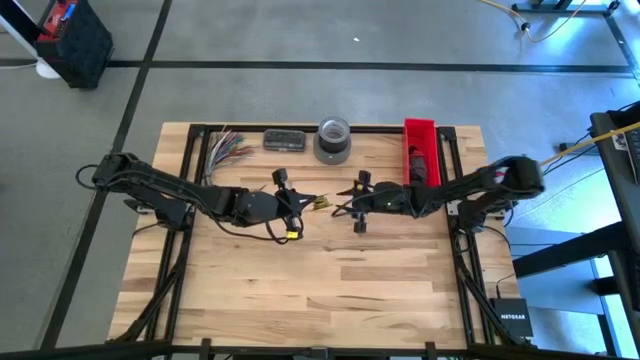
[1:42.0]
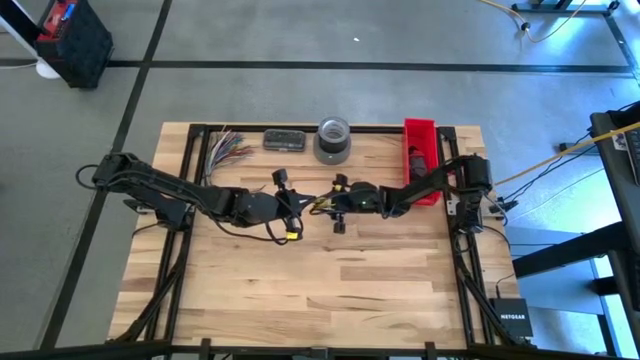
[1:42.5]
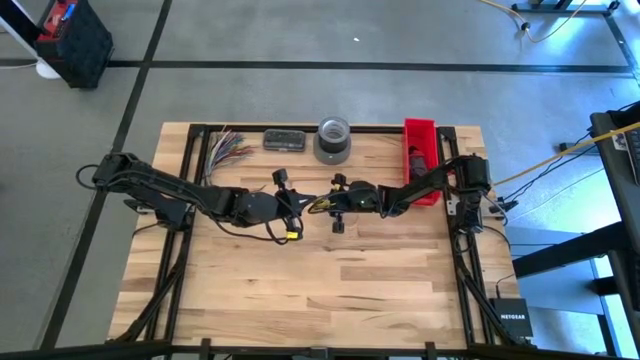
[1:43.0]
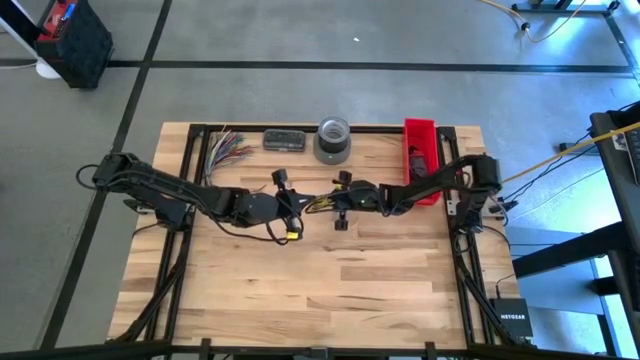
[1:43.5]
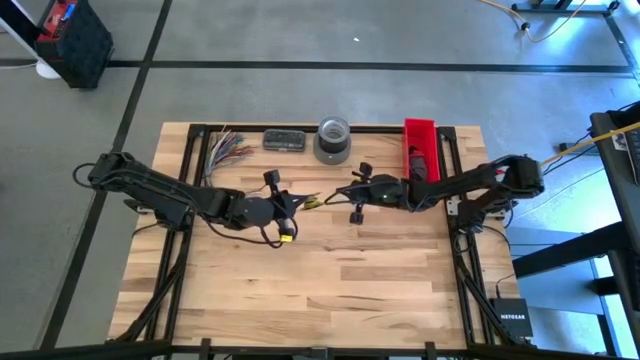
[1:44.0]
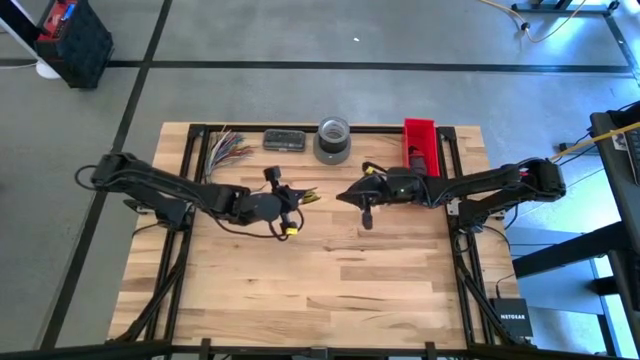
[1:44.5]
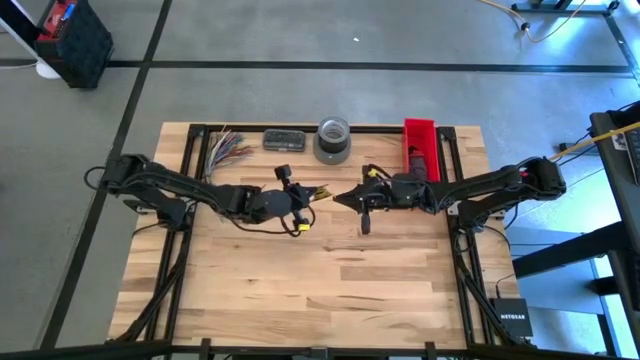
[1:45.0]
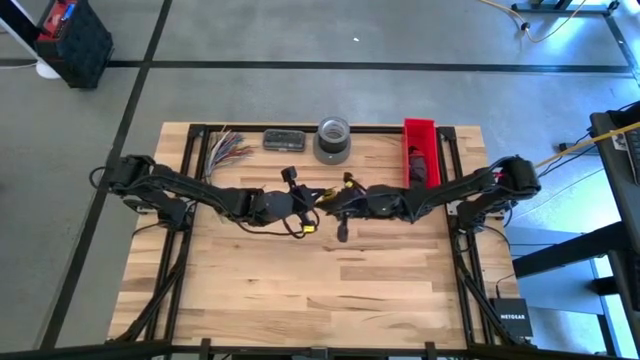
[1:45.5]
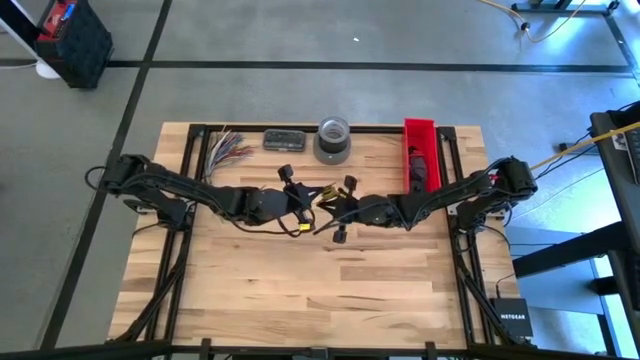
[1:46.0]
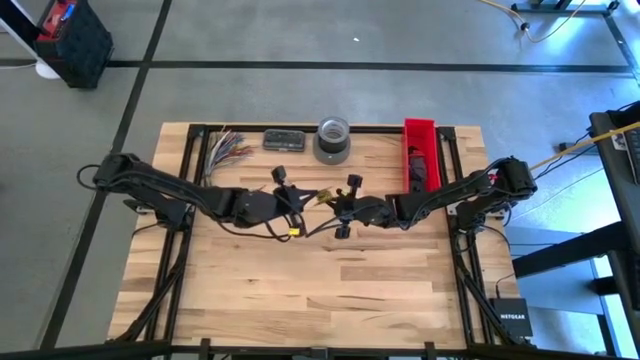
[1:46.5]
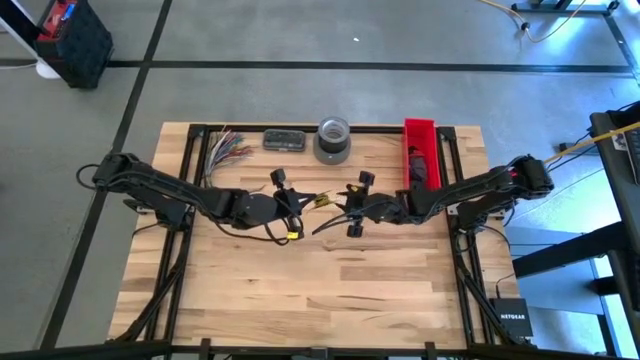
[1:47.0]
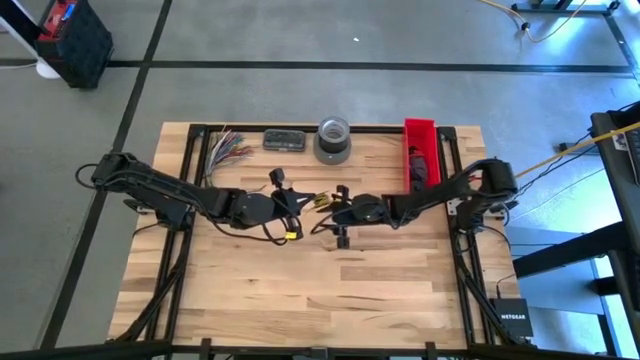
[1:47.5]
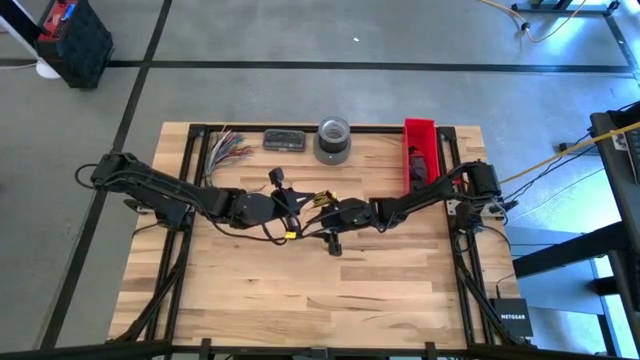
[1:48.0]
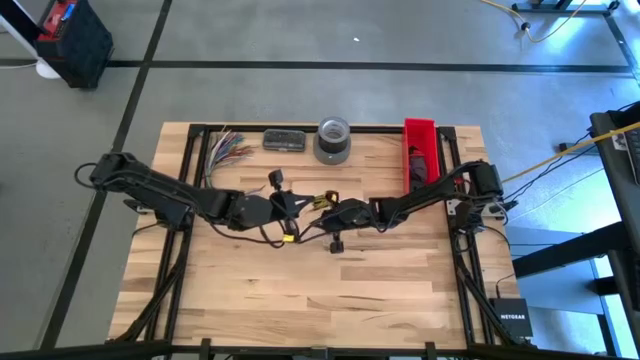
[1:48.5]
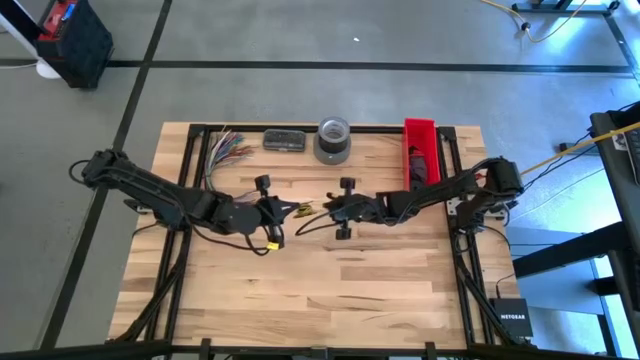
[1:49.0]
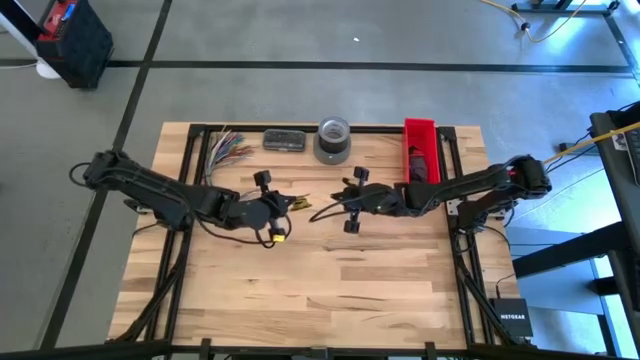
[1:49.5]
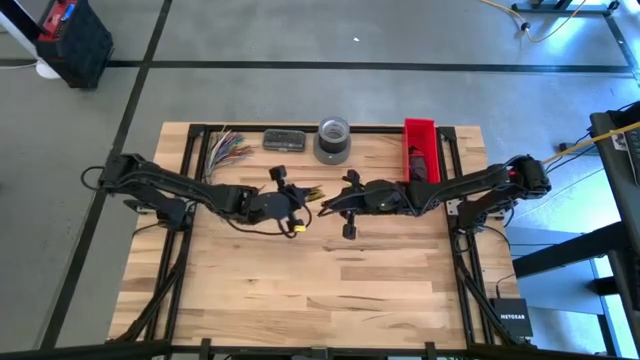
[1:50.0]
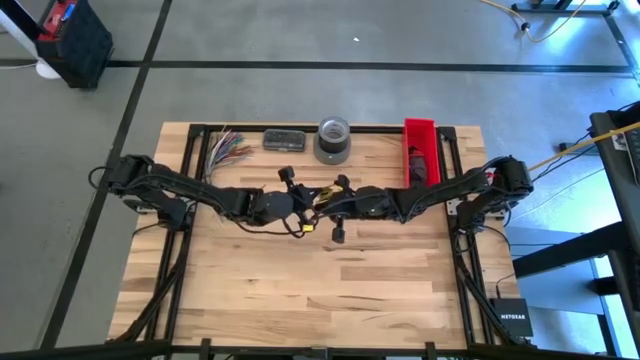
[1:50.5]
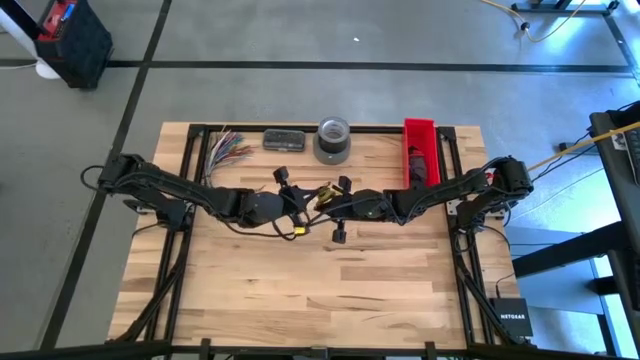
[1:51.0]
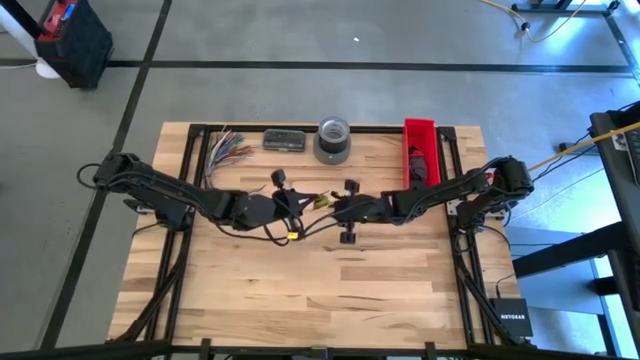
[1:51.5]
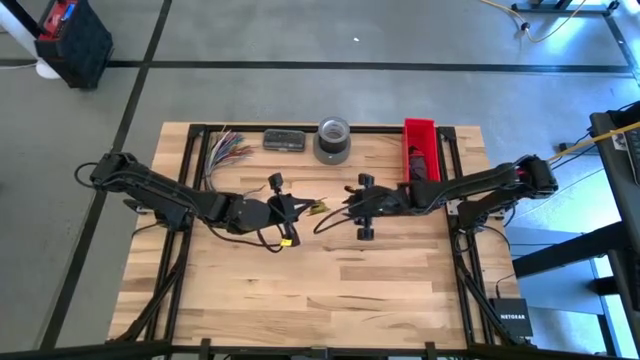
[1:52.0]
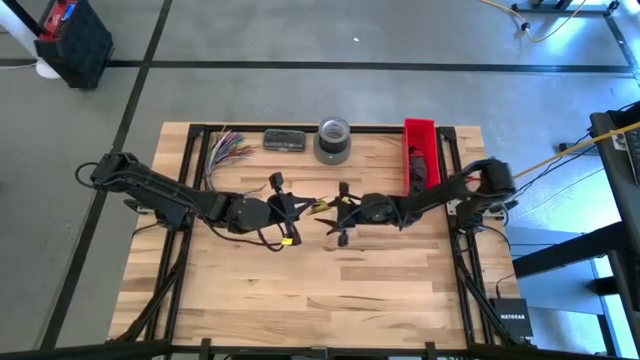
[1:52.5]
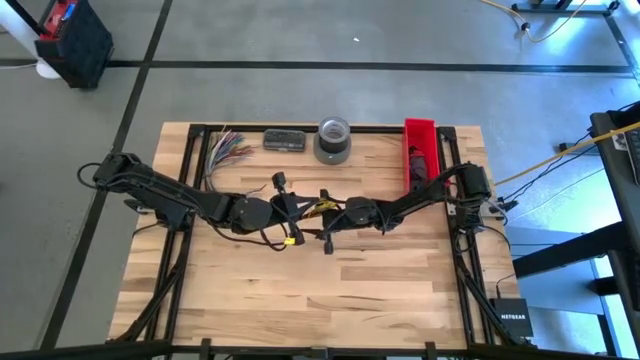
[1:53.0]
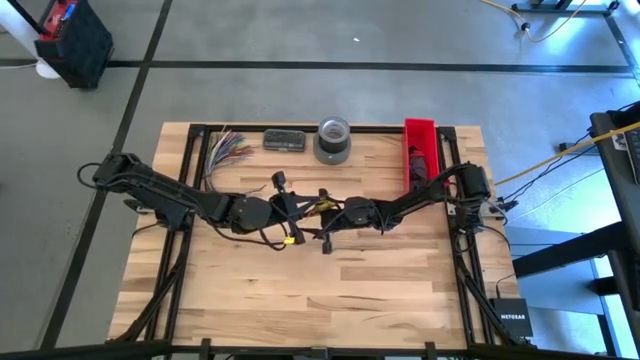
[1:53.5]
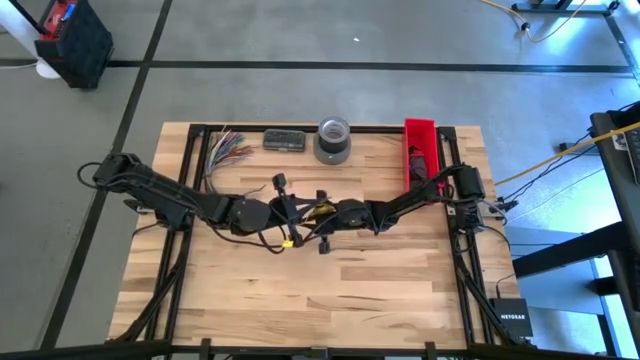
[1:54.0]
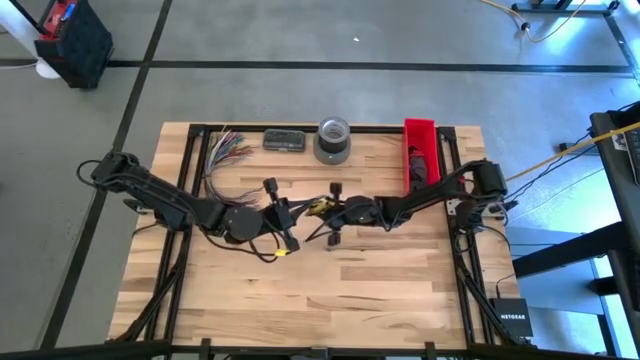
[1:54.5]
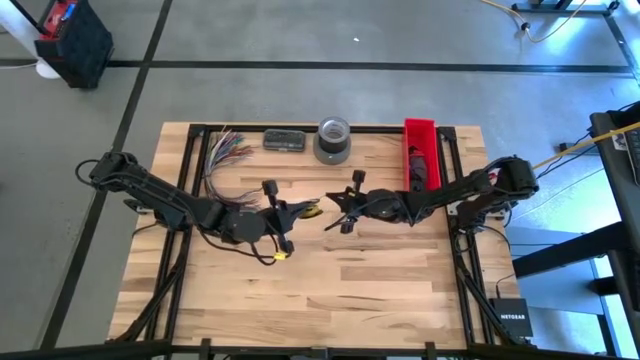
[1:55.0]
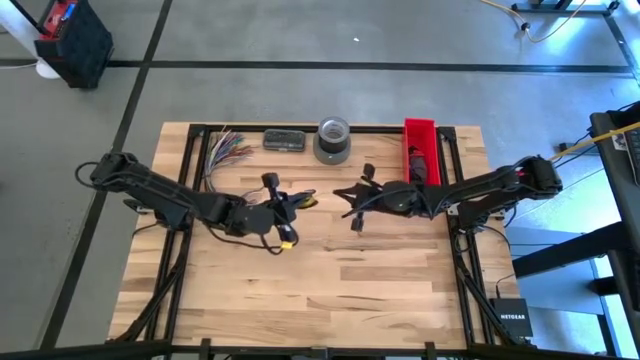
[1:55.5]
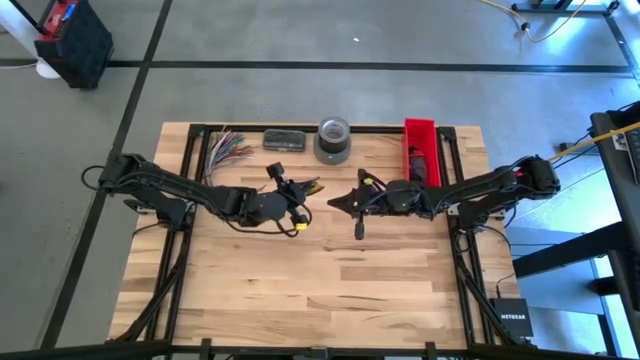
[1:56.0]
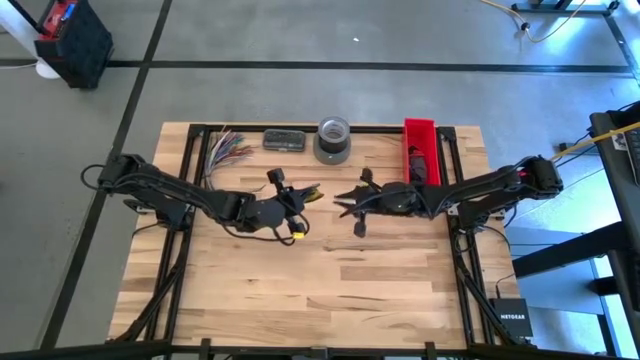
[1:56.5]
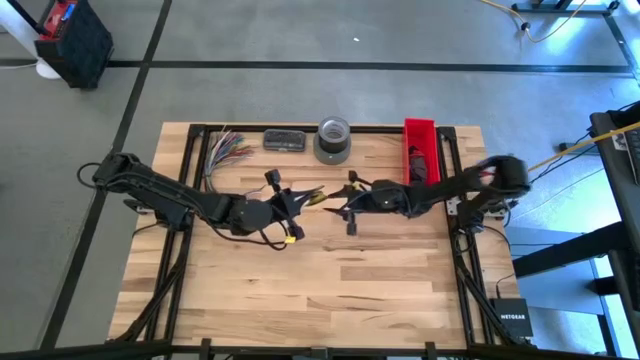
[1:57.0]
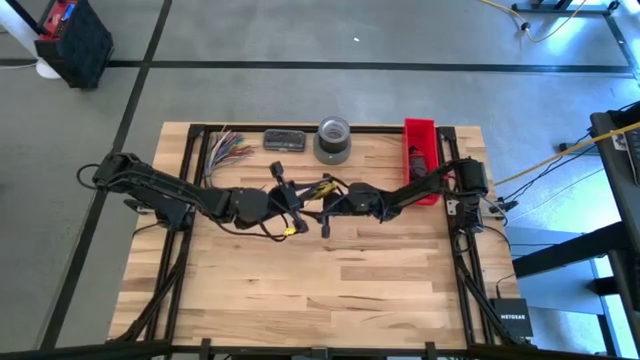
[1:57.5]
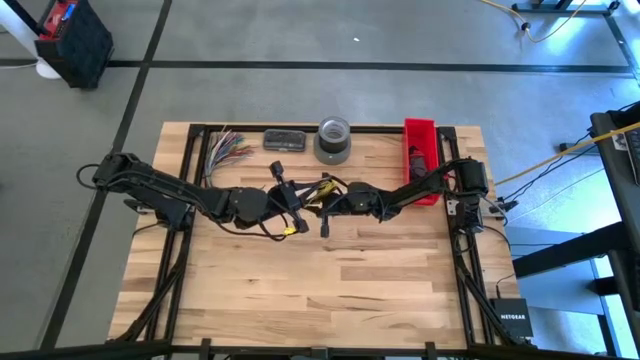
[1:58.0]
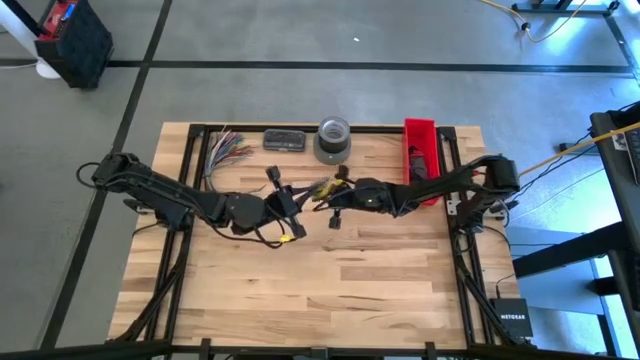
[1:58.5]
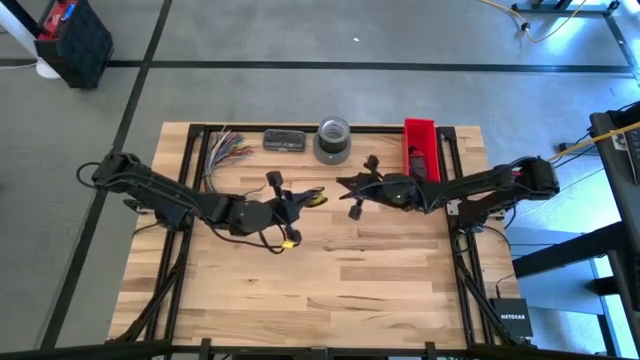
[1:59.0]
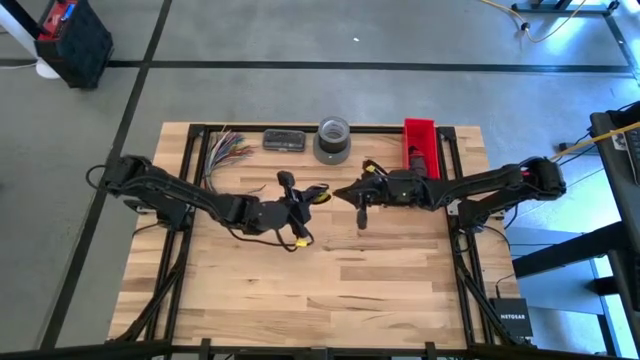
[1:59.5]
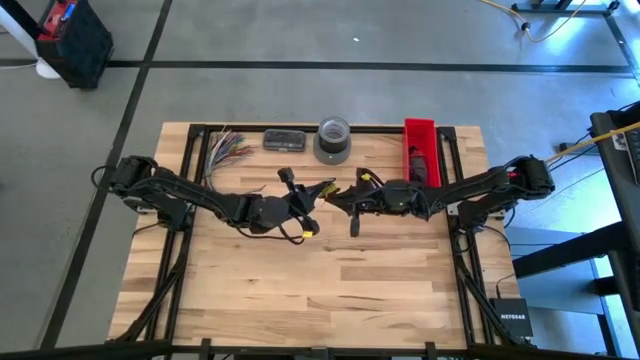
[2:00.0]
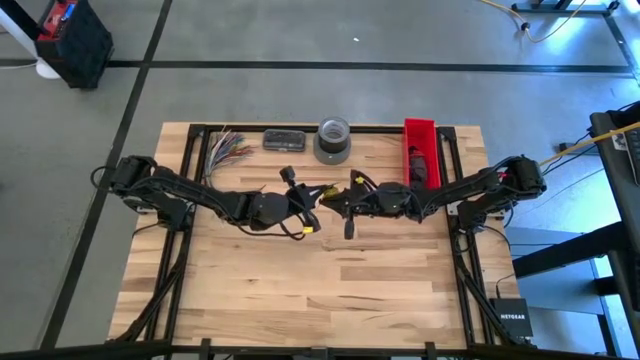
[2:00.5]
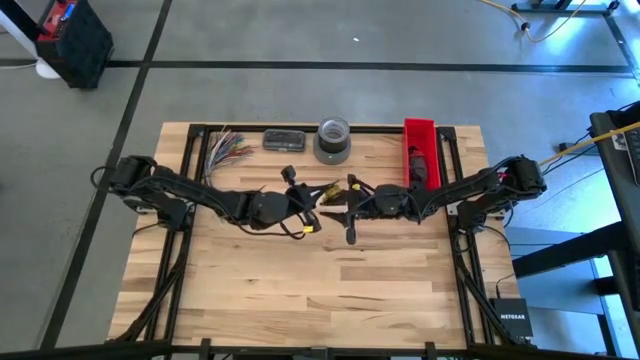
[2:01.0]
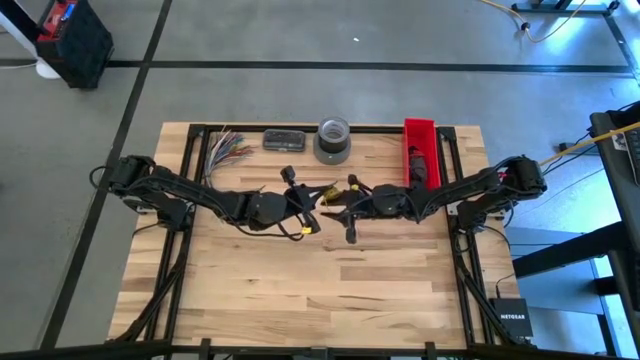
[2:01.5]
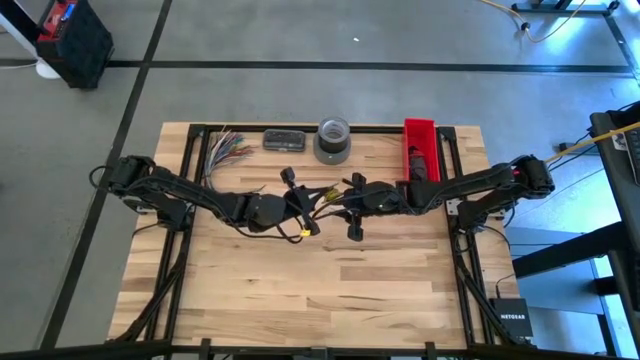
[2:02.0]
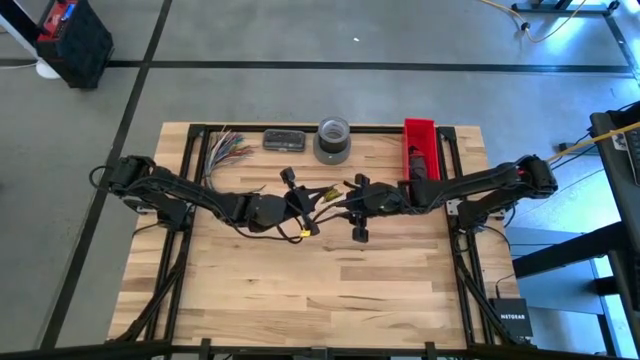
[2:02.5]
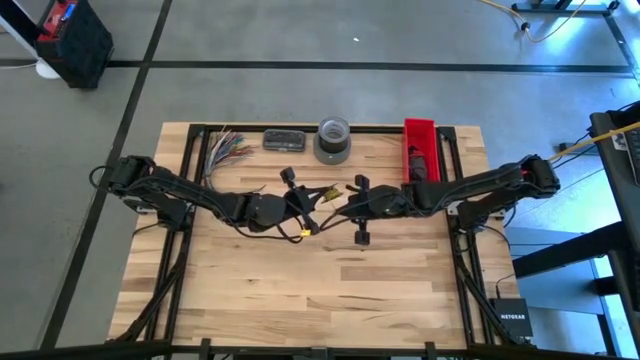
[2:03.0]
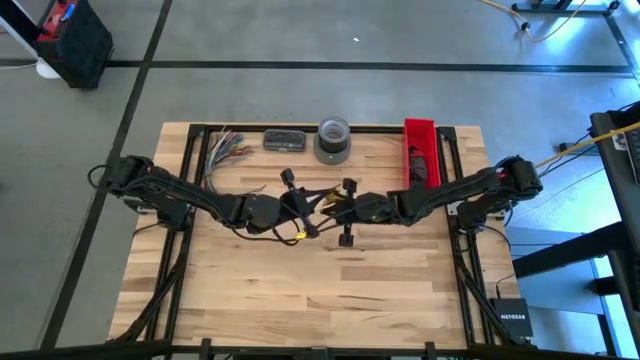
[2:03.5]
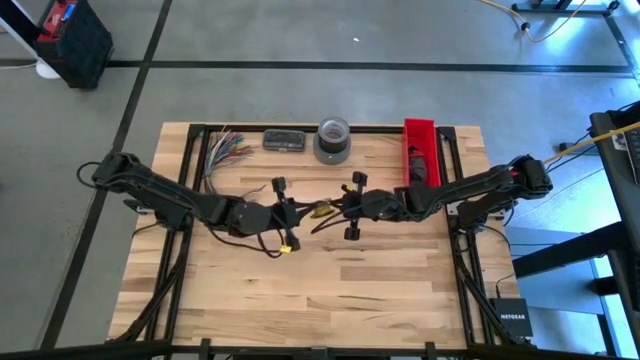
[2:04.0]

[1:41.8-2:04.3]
Task: Coil cords
Coil the yellow wire into the black spool
